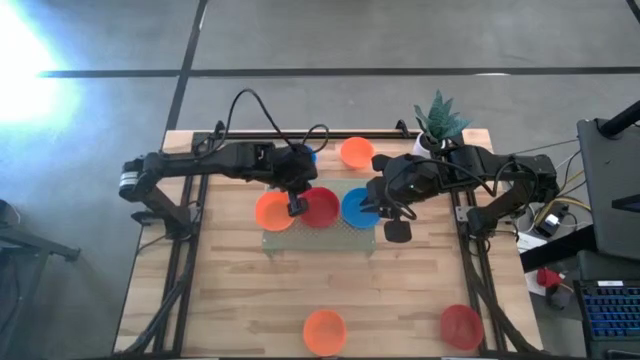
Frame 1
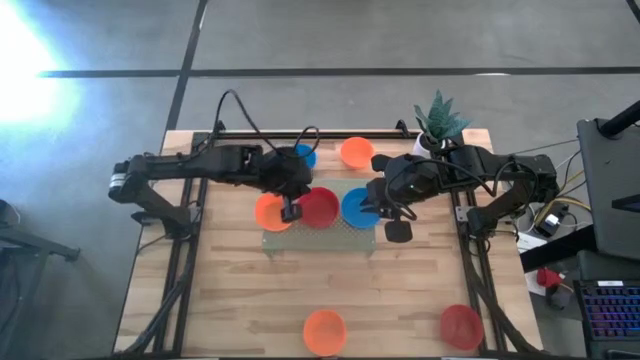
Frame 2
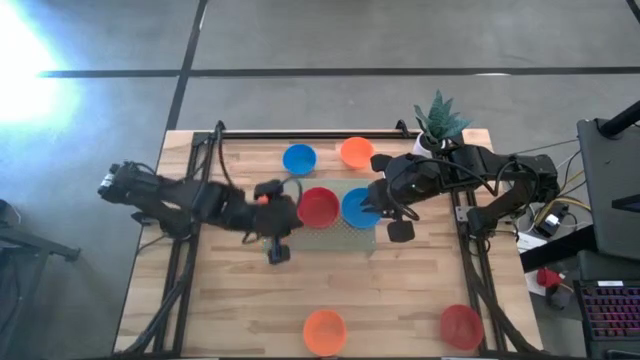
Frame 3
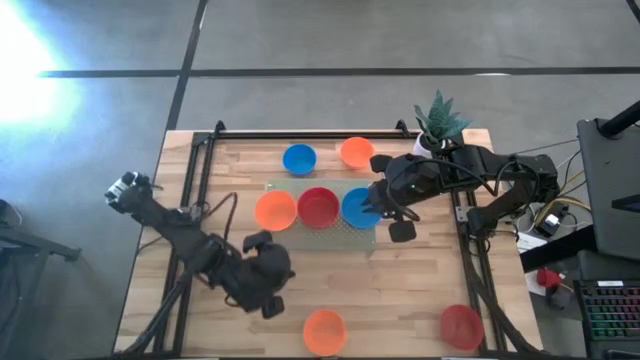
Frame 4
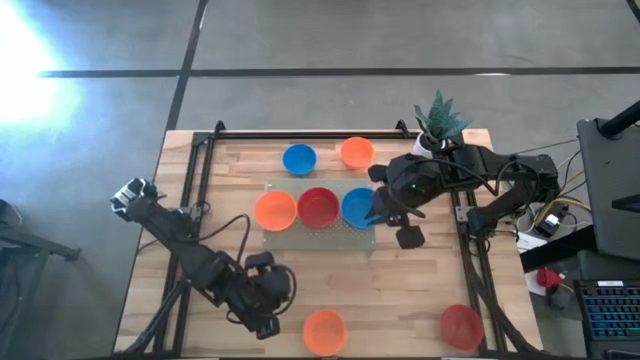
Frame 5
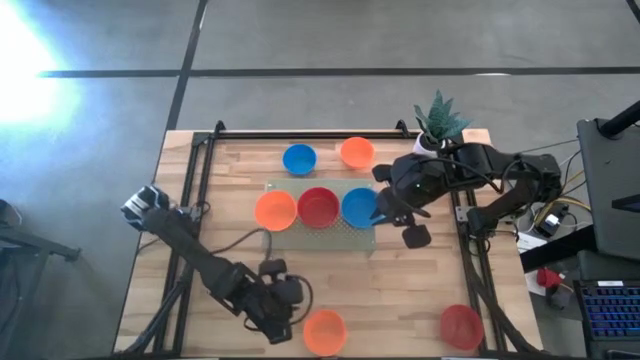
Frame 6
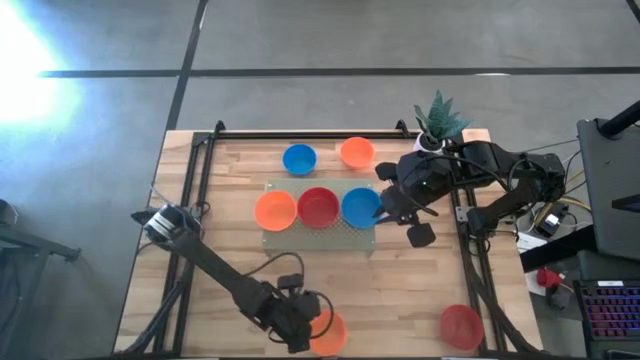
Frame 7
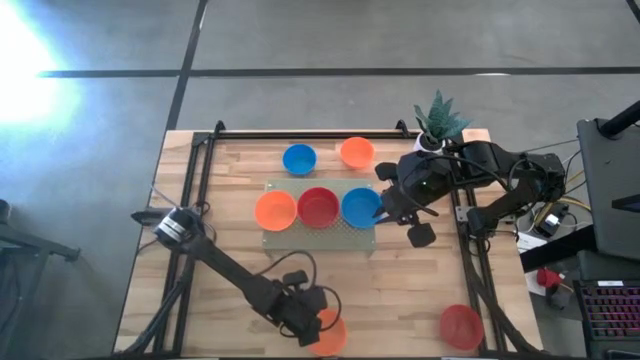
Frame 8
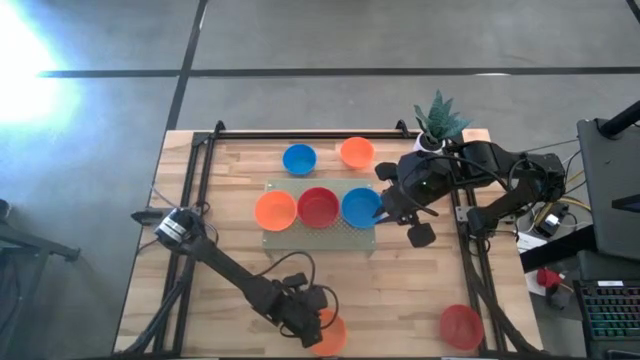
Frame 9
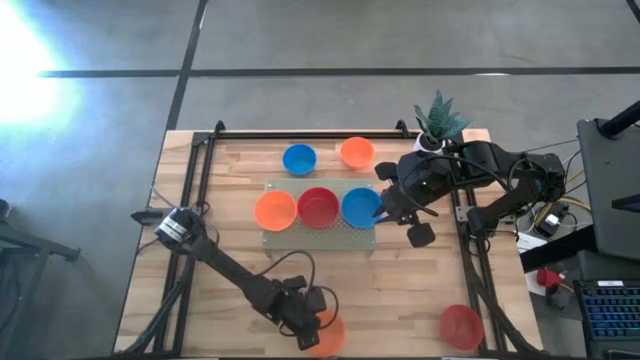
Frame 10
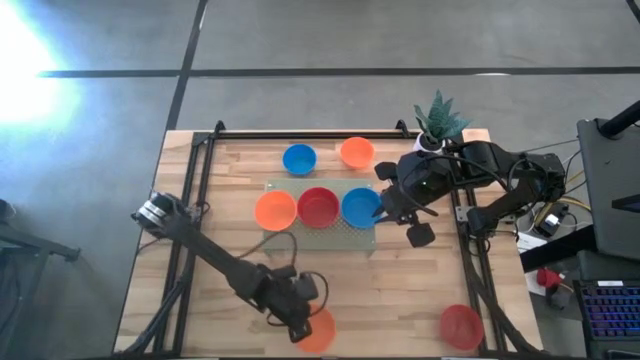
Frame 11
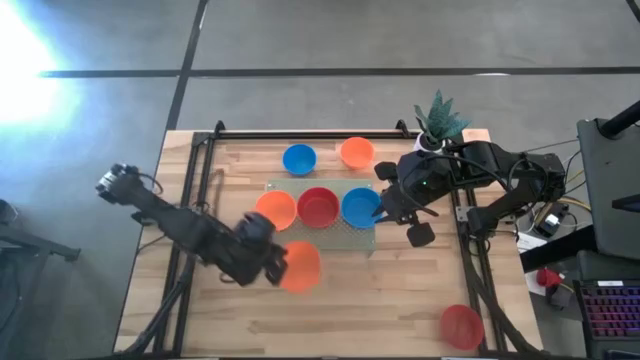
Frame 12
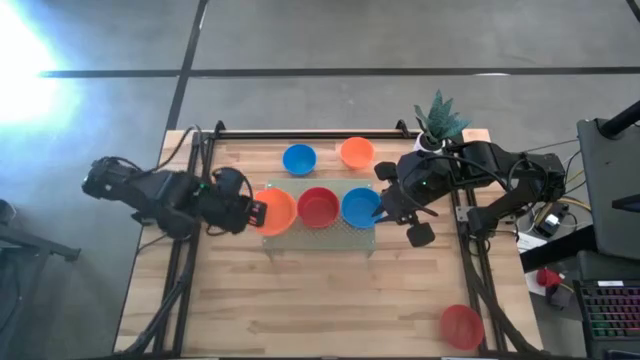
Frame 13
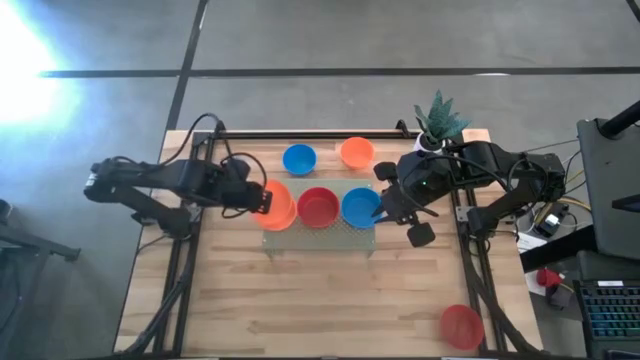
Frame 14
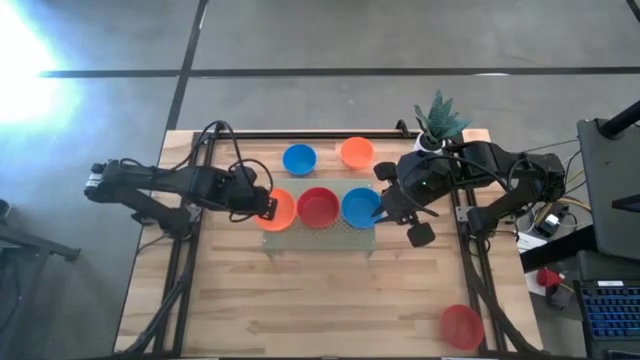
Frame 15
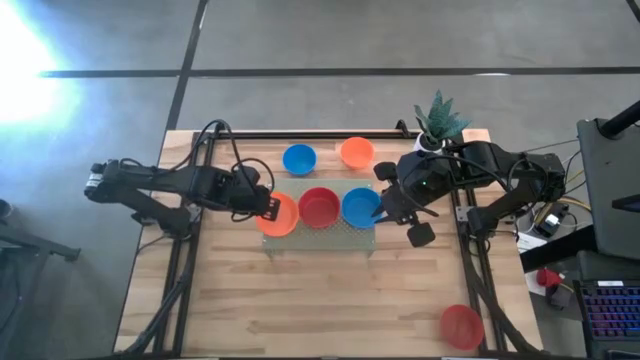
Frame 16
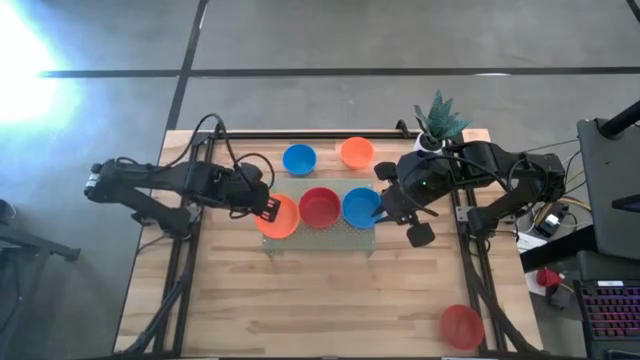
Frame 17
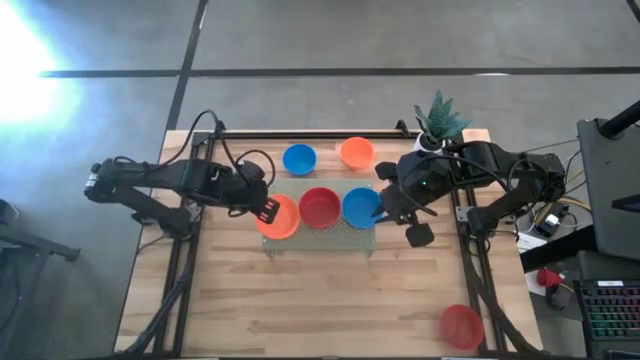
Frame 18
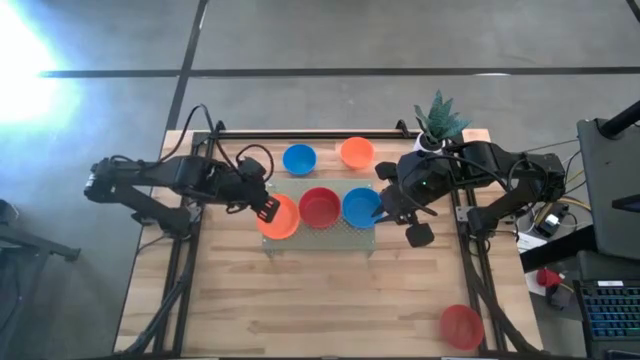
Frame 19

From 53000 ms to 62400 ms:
Task: Pick & Place Mini bowls
Stack the bottom orange bowl on top of the other orange bowl on the shelf

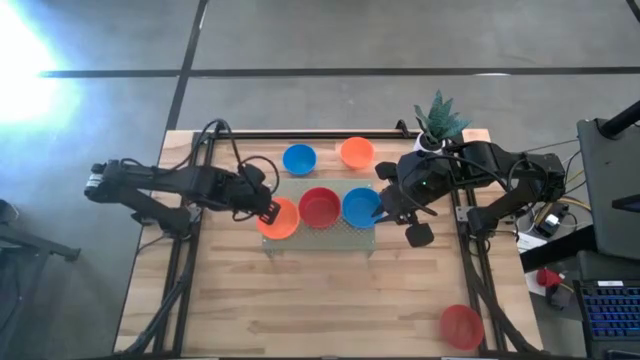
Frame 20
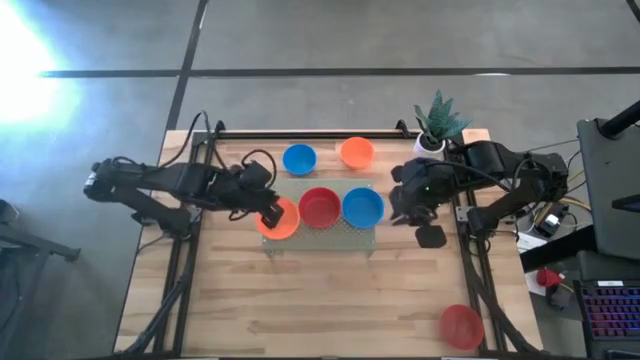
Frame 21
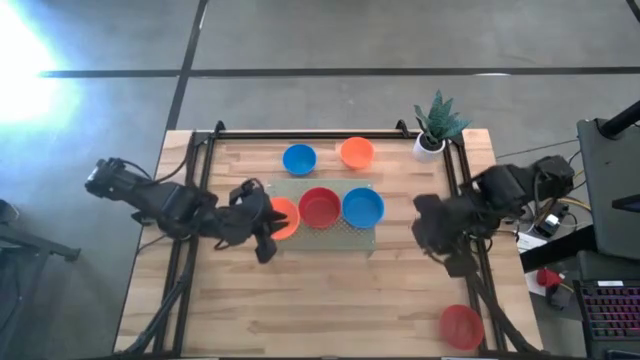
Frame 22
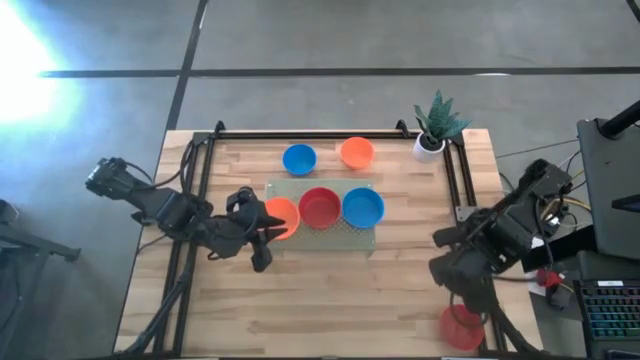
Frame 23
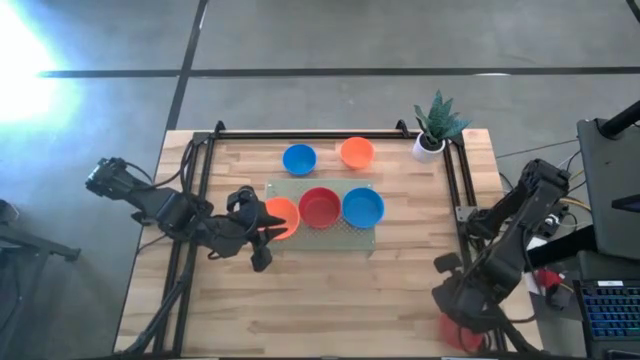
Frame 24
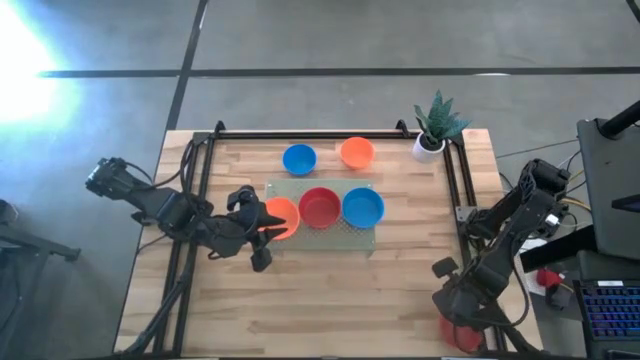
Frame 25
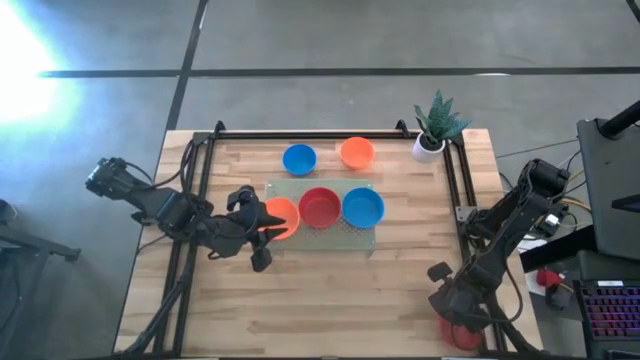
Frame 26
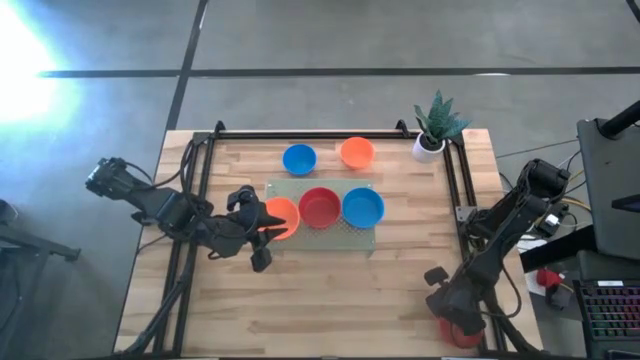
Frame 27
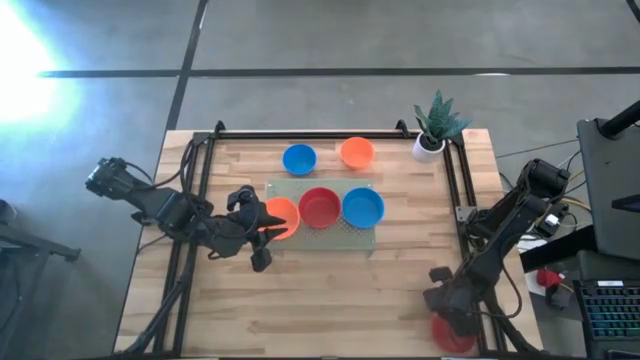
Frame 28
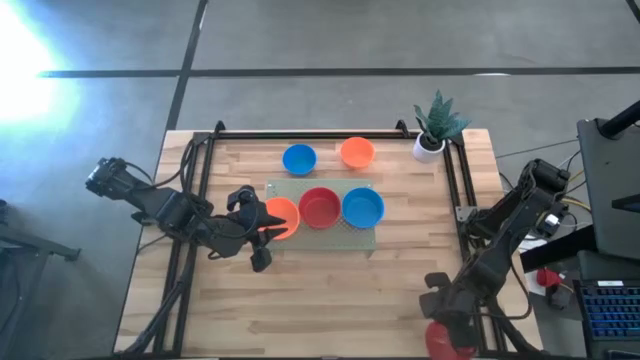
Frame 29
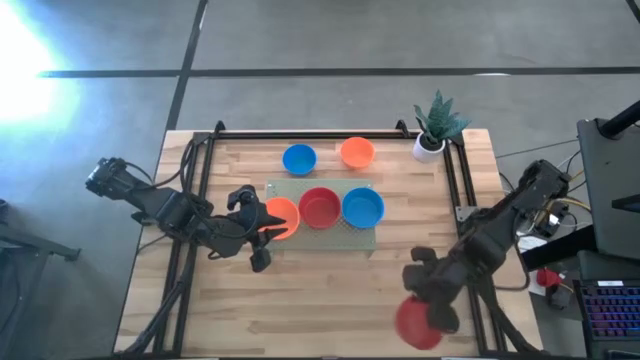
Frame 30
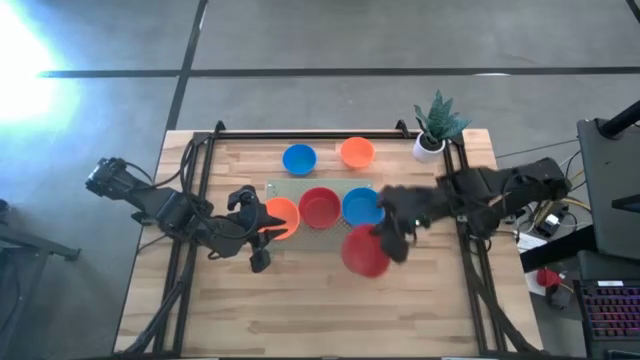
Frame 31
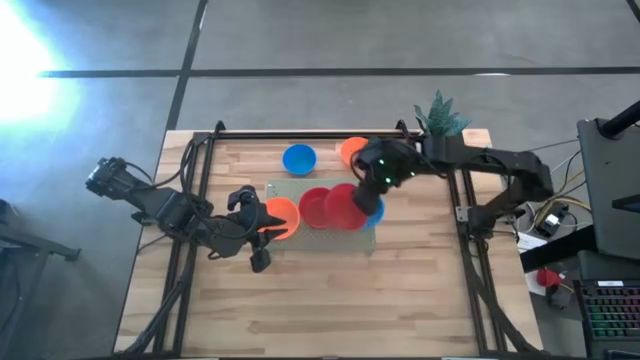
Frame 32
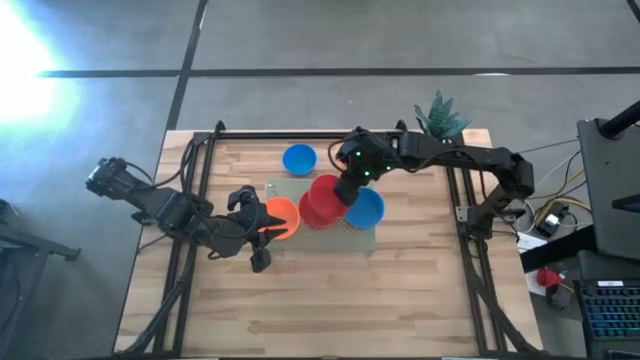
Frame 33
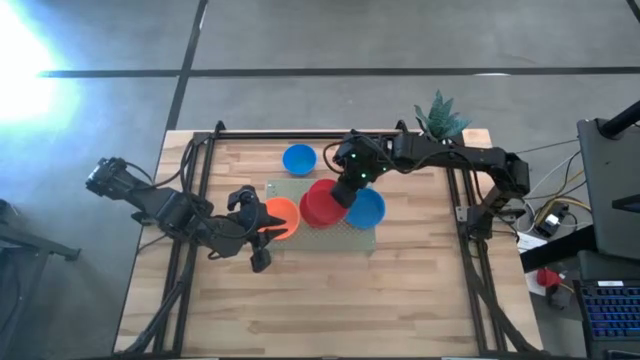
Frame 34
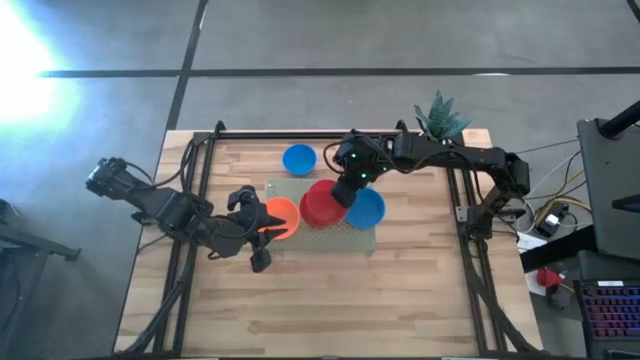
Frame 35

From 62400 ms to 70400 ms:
Stack the red bowl on top of the other red bowls on the shelf

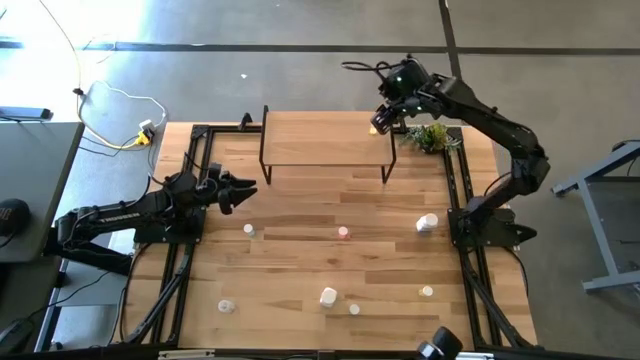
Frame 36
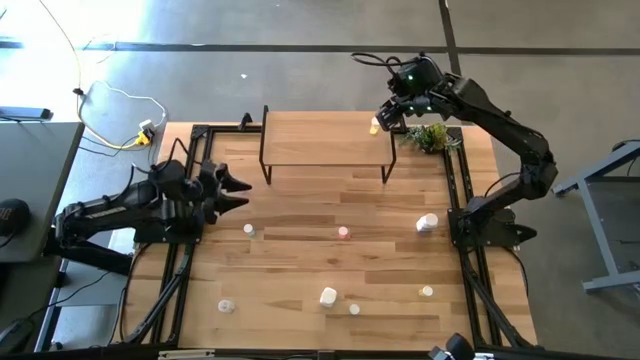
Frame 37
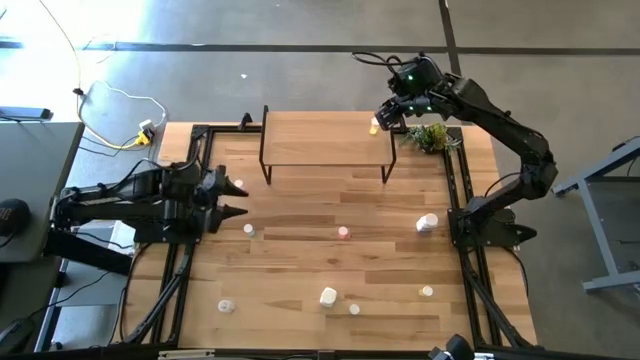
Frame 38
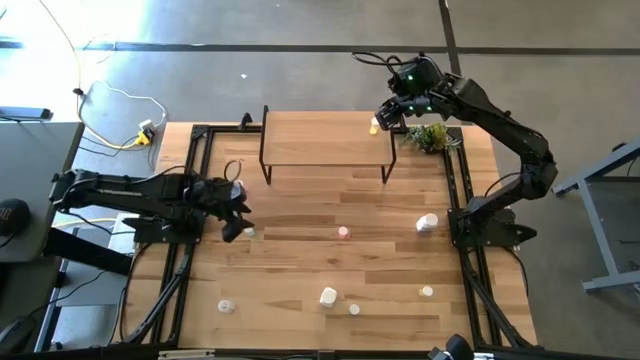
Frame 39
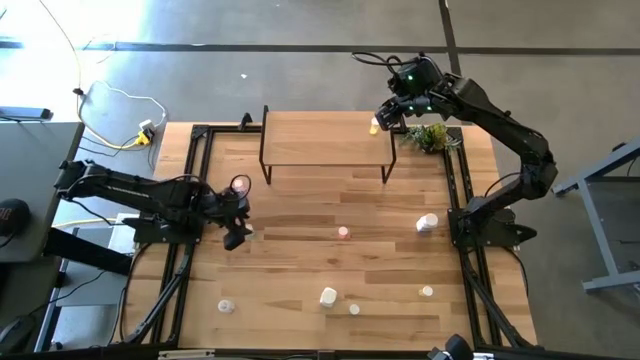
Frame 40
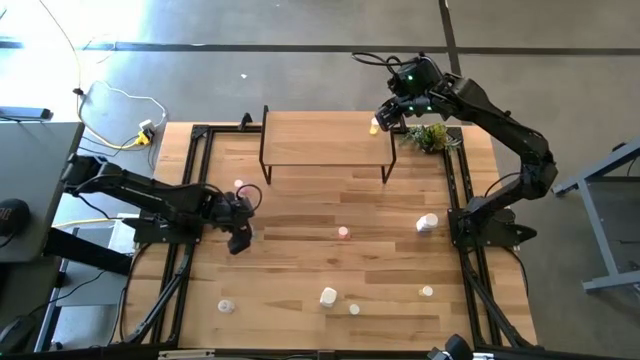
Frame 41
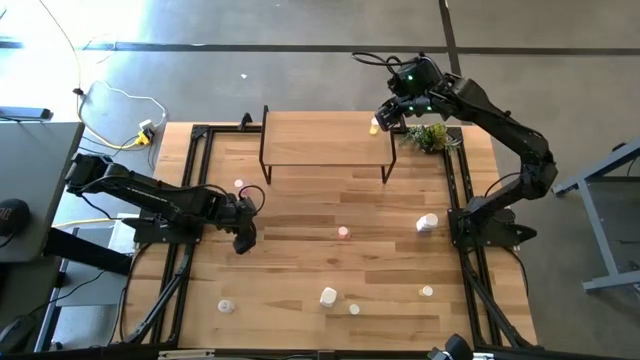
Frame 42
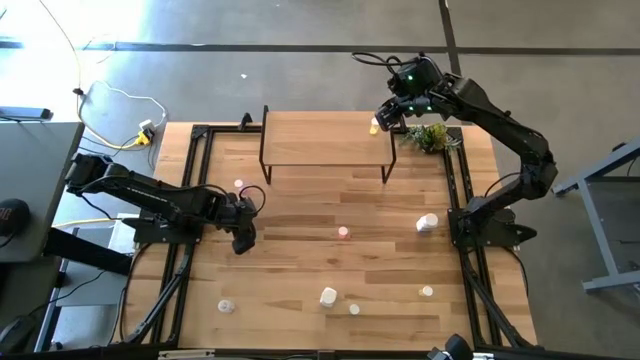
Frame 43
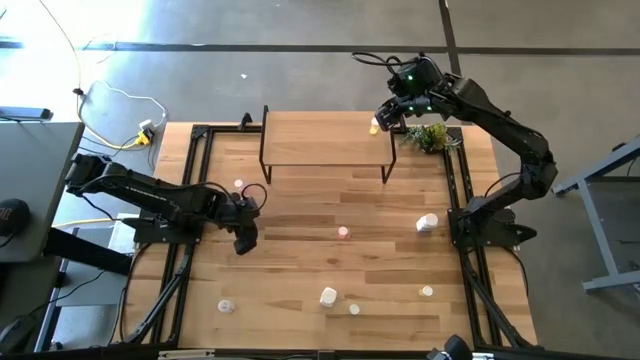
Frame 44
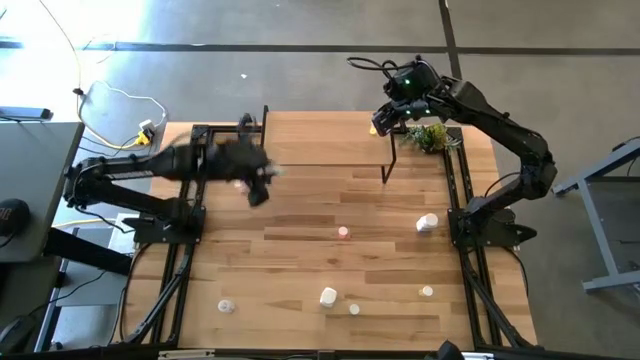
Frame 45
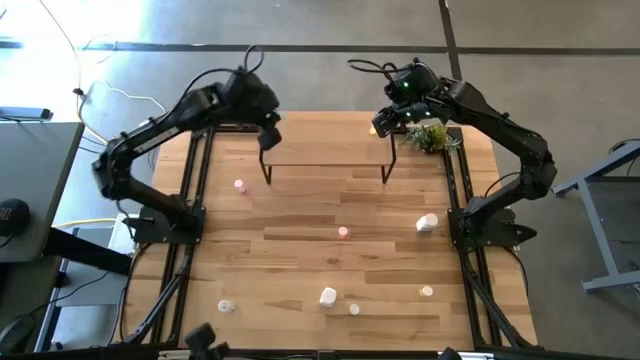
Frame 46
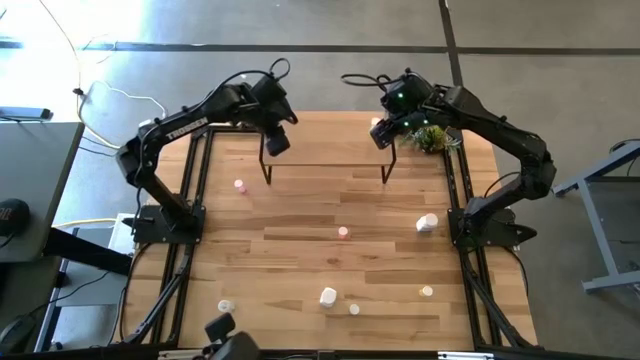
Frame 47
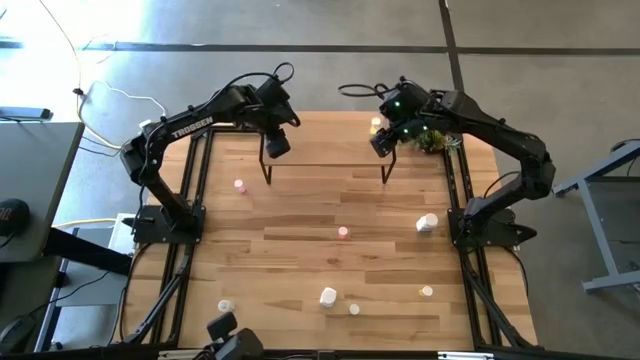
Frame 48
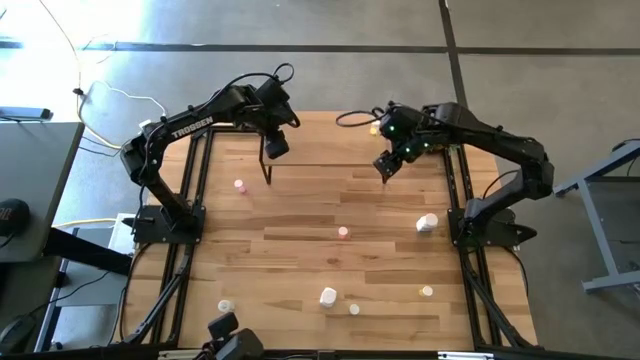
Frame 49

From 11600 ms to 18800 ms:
Task: Pick and place medicine bottles onto shelf by color
Put the top green pill bottle on the shelf
